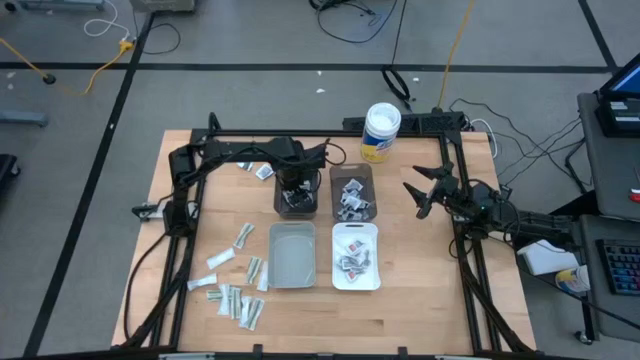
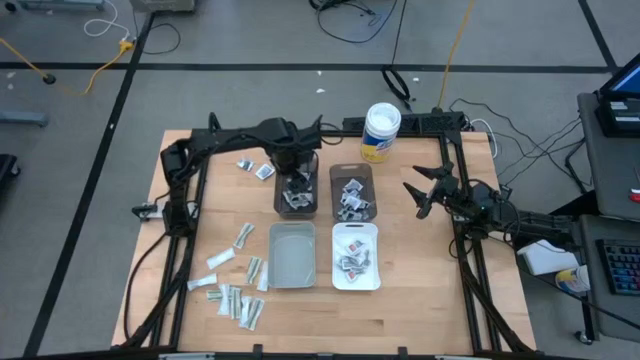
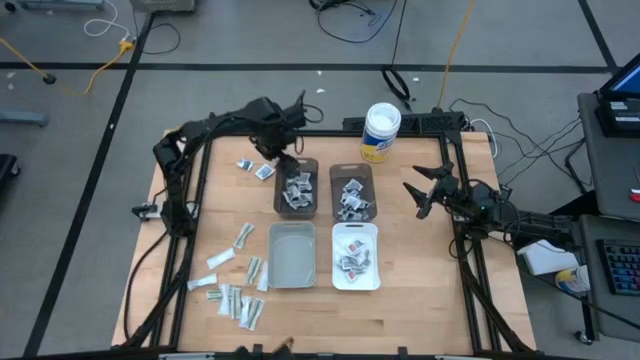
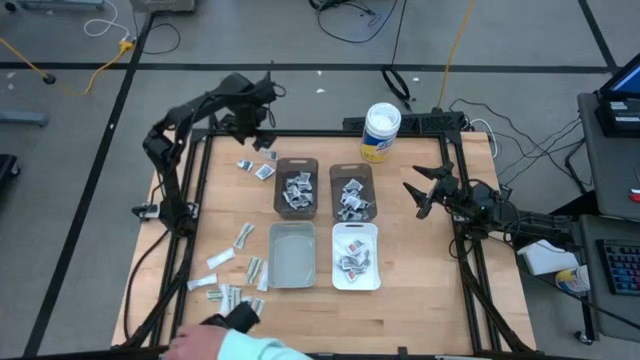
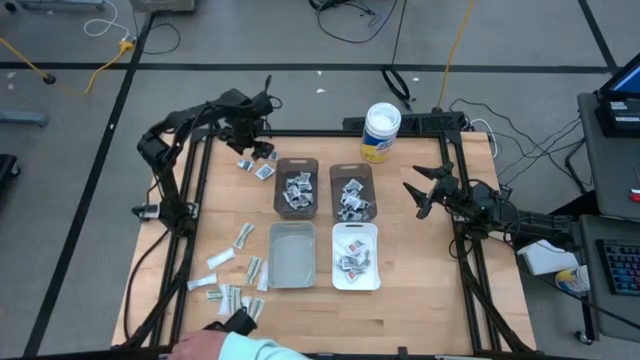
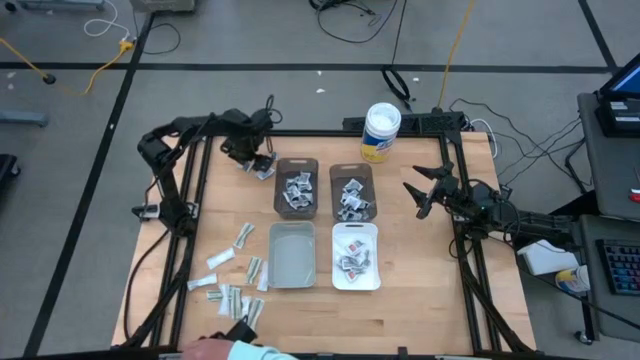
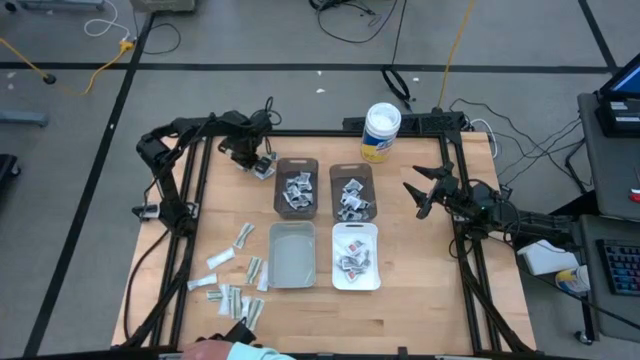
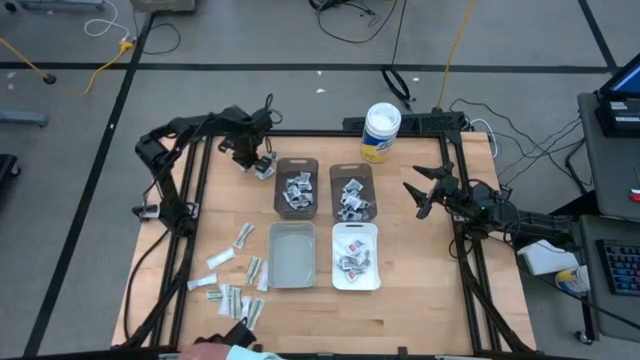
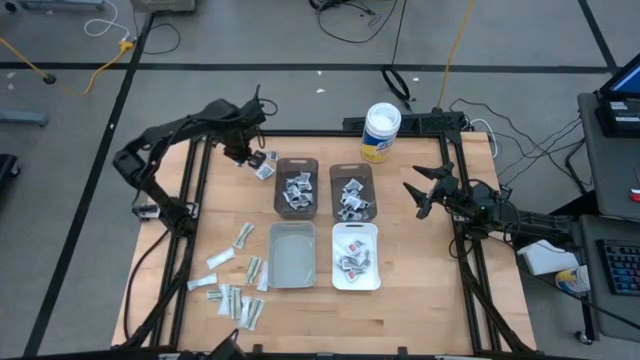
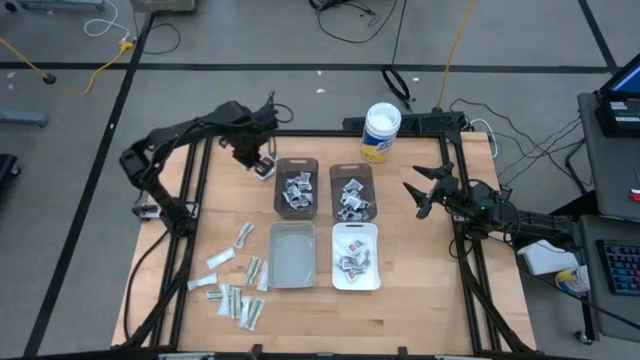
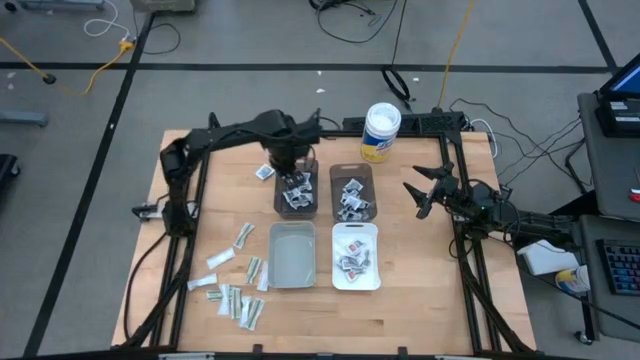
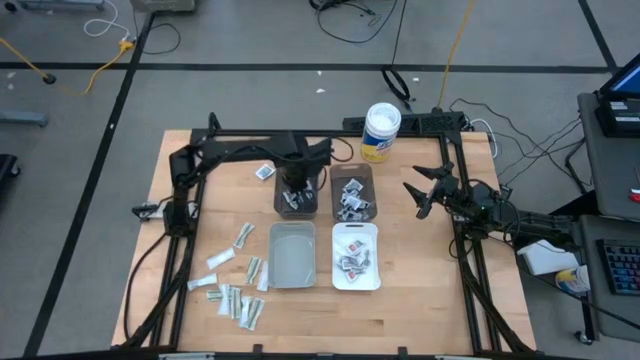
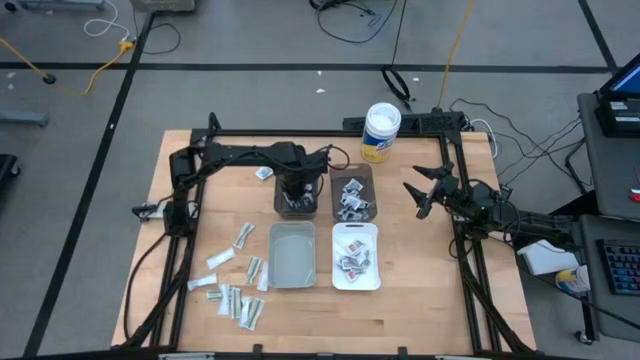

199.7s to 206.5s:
Task: Pick & Place First Aid Supplies
Put the gray pad into the left black bin

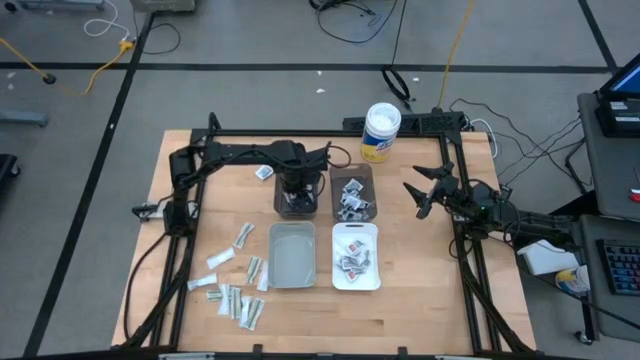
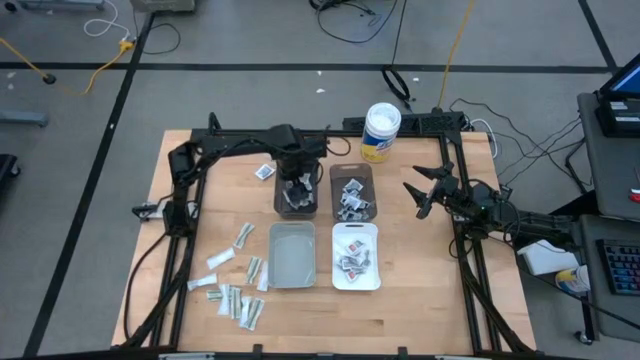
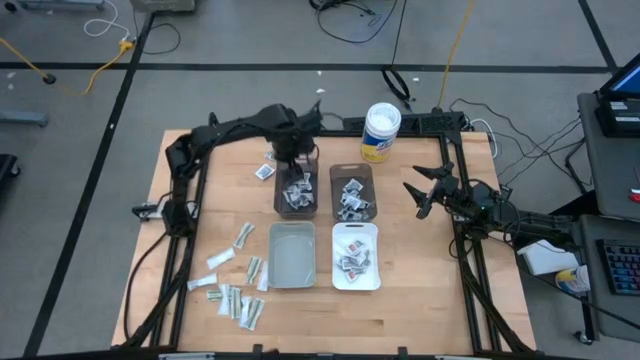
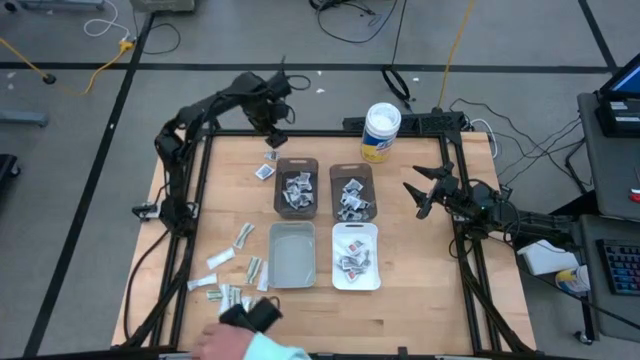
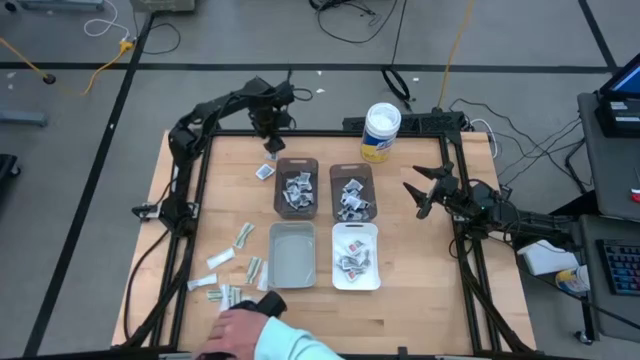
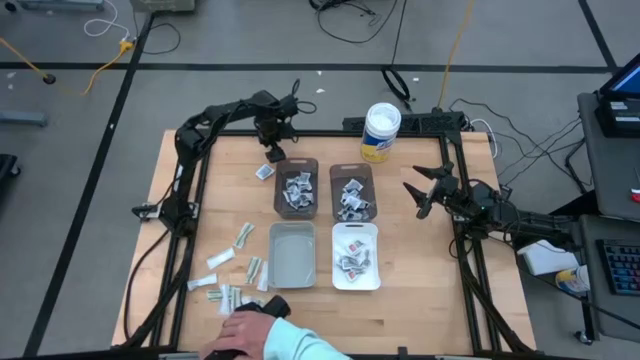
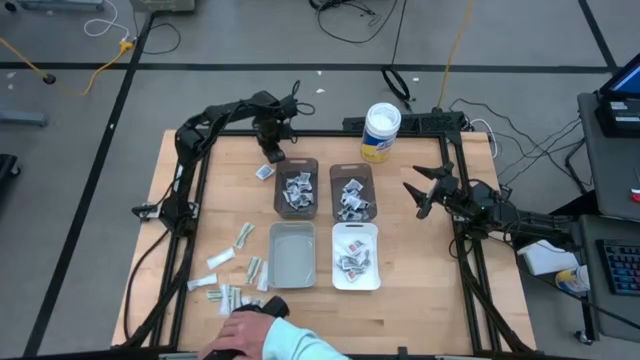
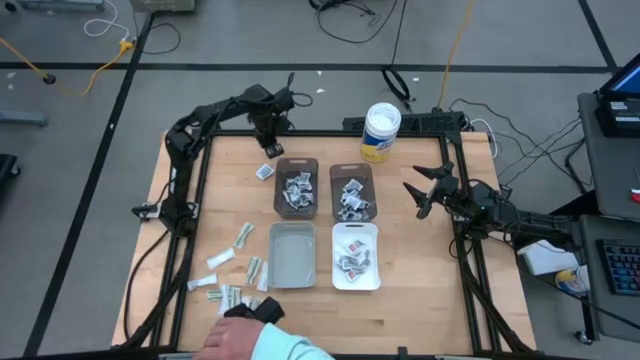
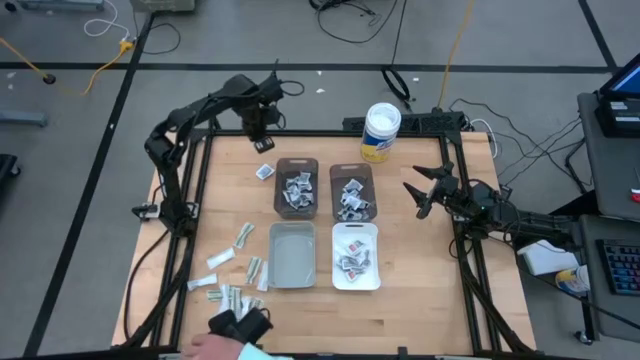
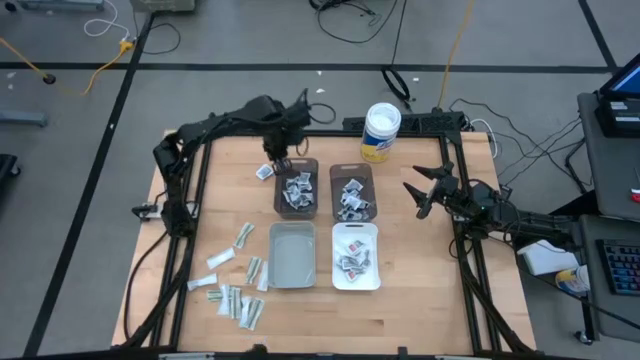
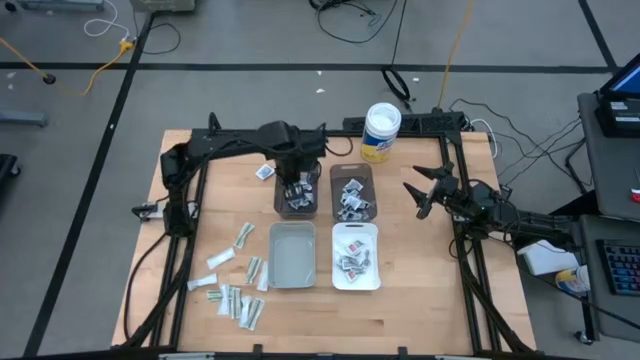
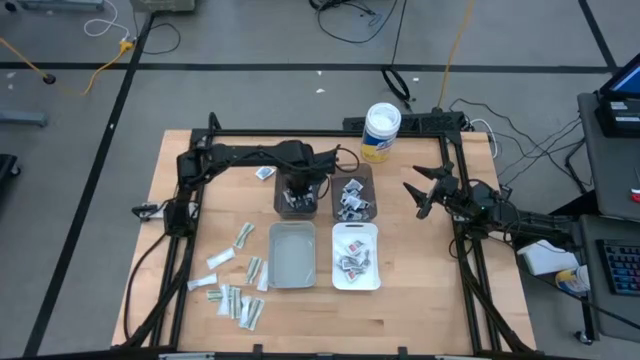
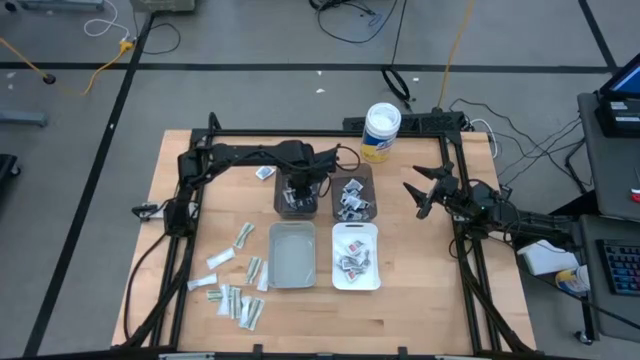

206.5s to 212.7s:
Put the gray pad into the left black bin

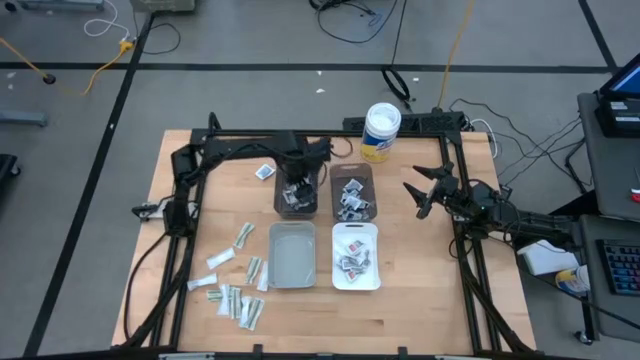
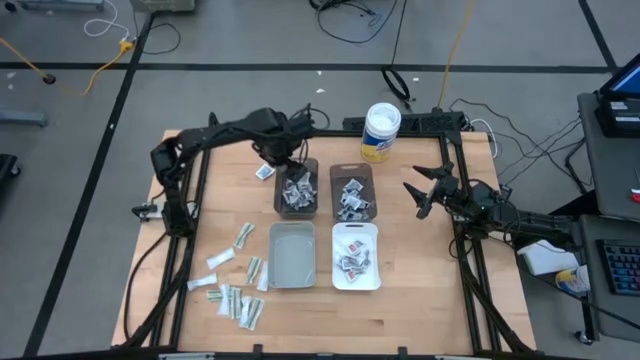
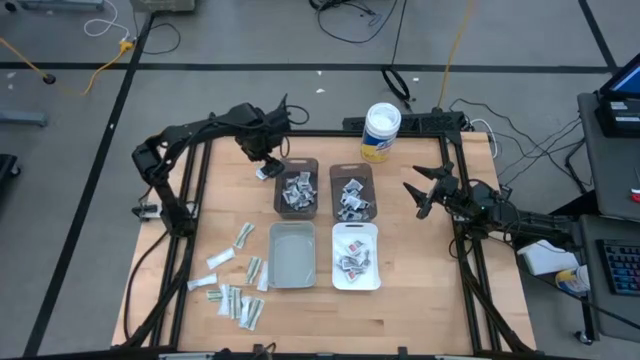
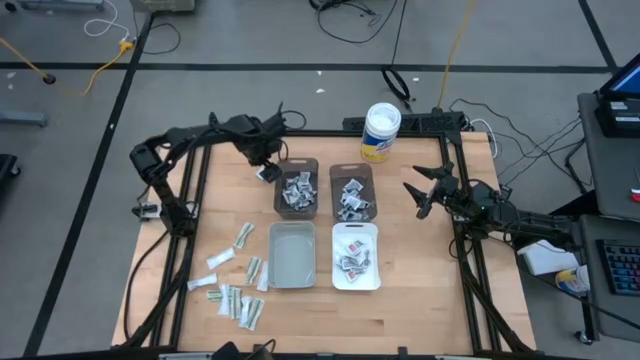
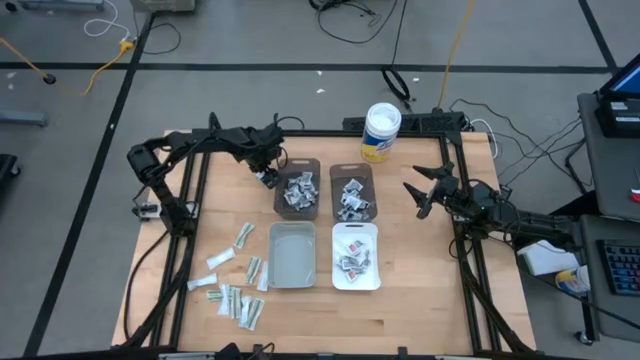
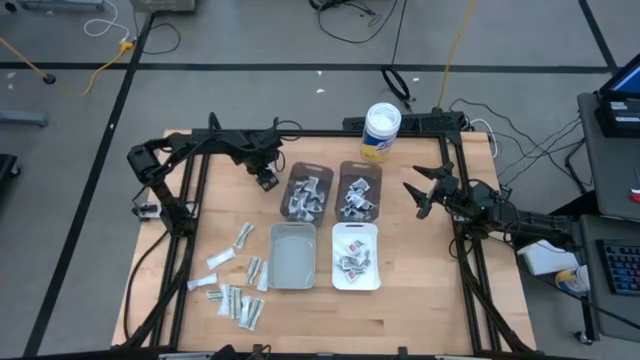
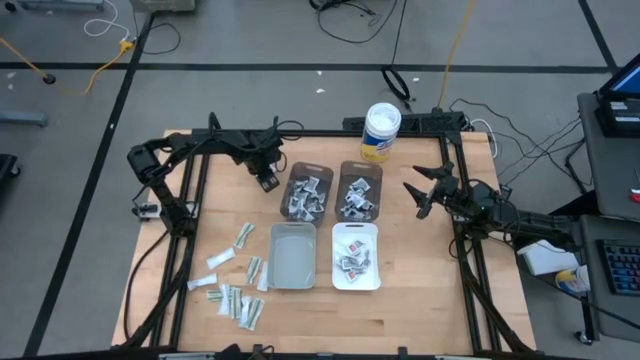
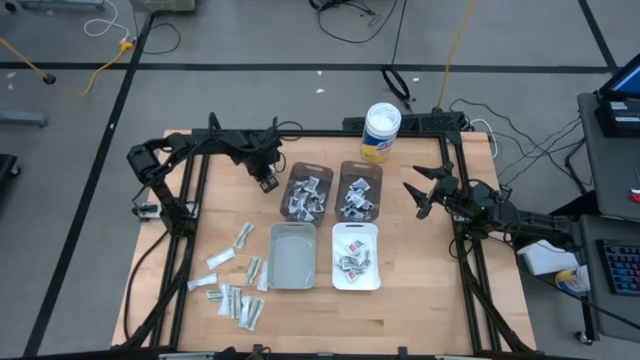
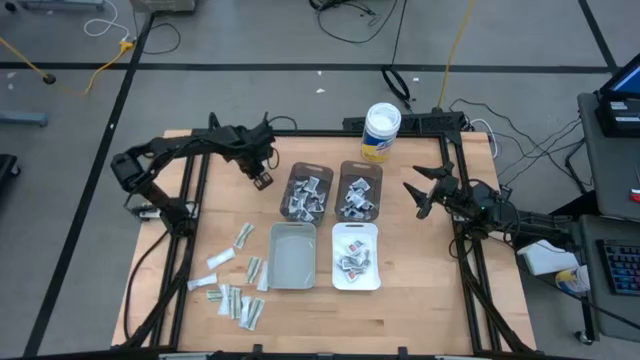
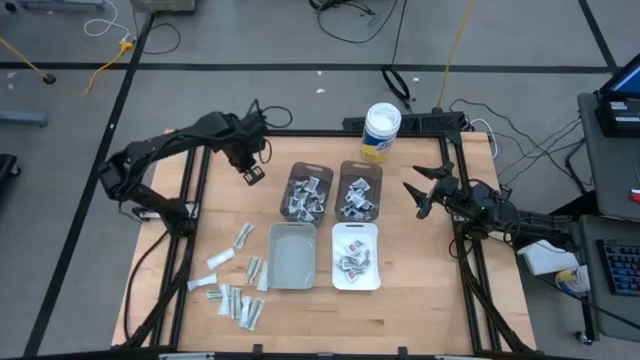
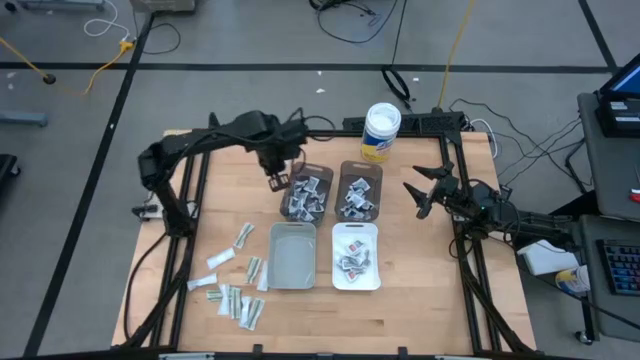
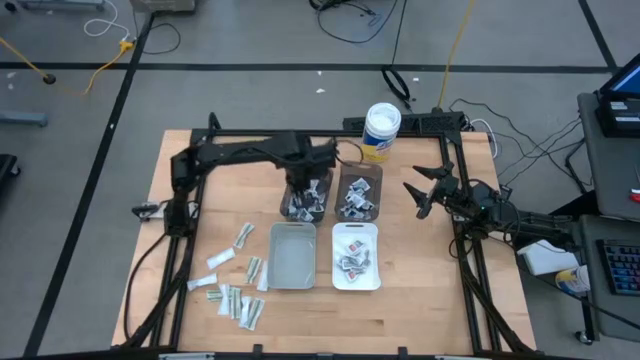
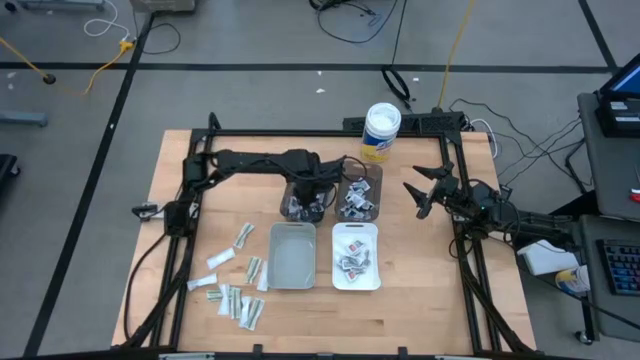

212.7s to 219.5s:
Put the gray pad into the left black bin

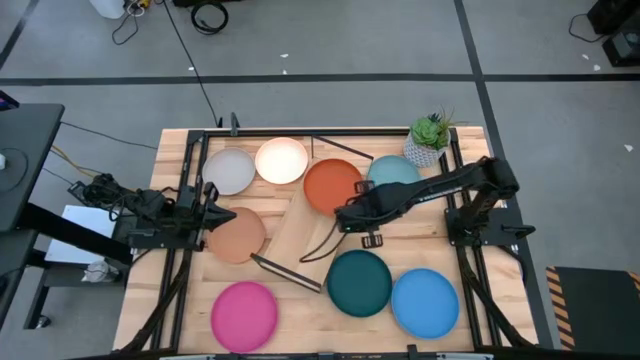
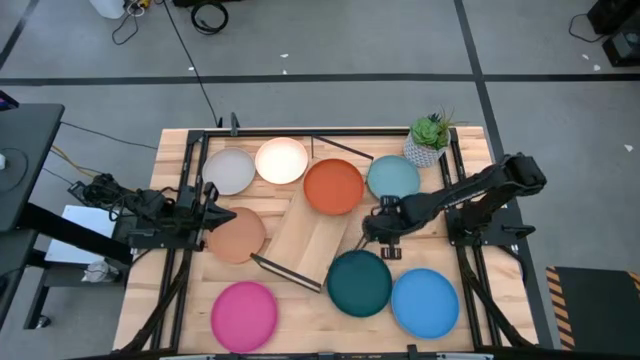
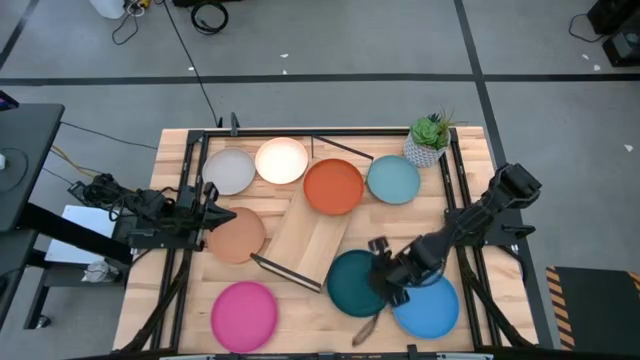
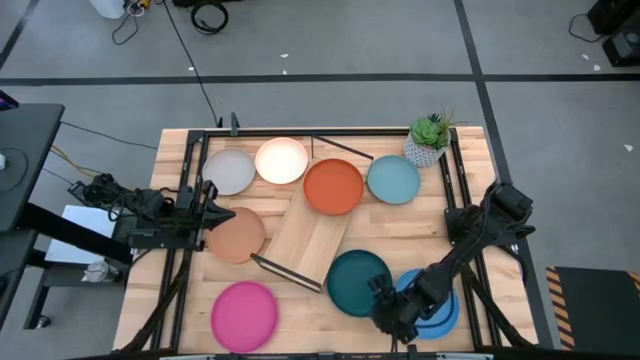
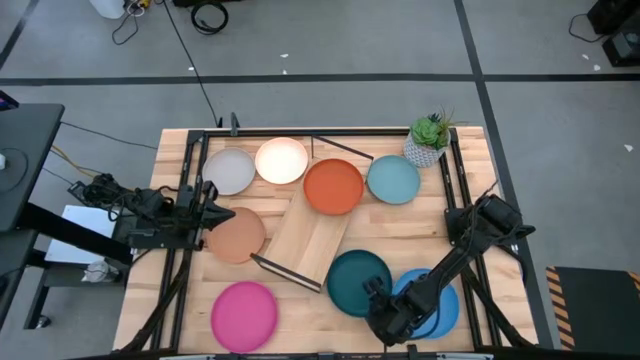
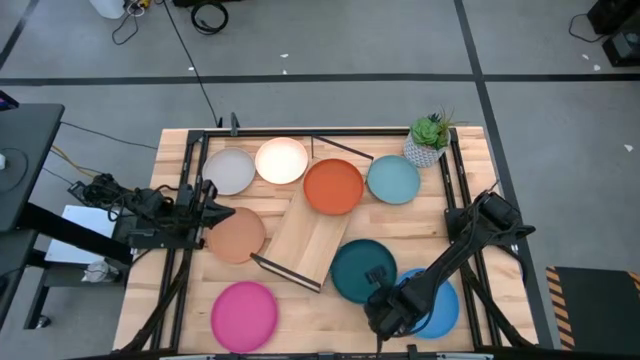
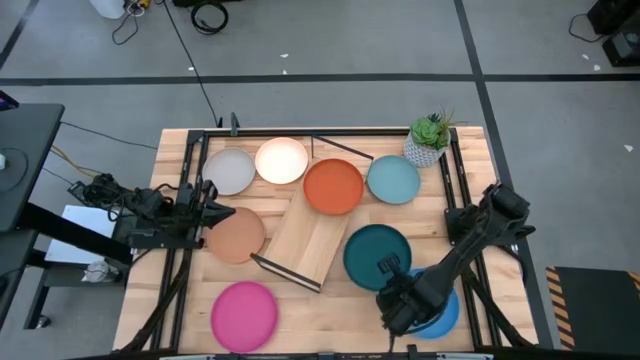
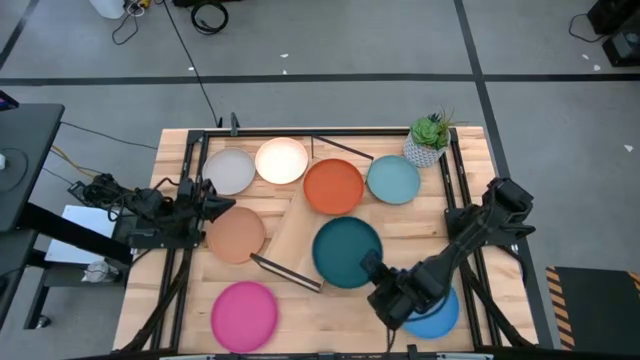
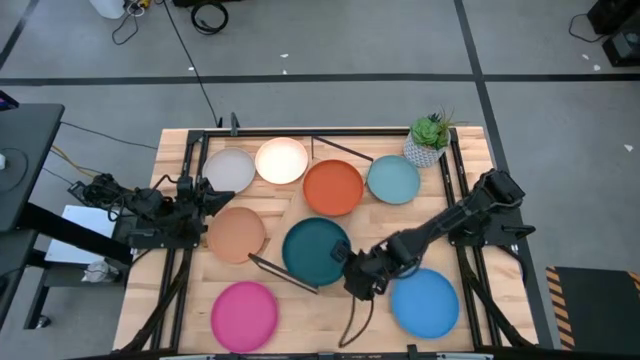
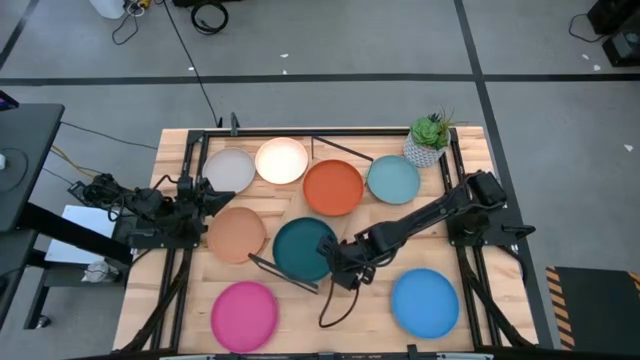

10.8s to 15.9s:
Task: Place and stack plates onto a shelf
Put the dark green plate on the shelf
